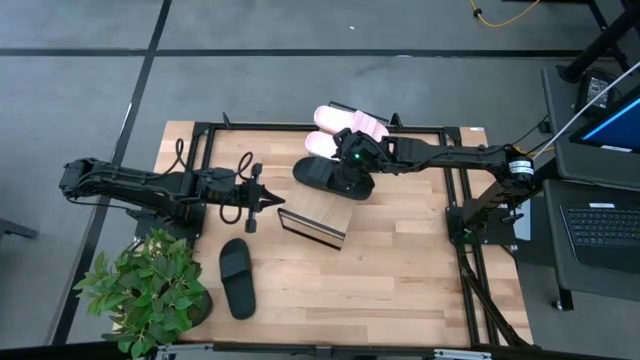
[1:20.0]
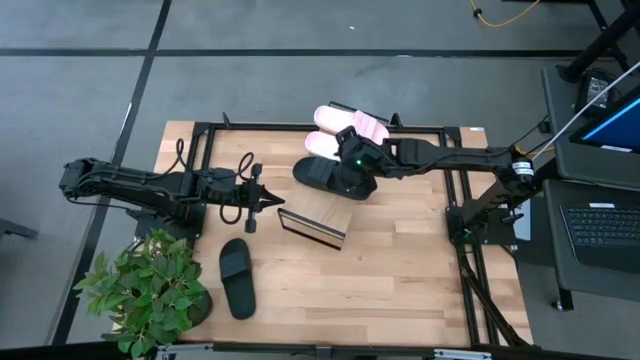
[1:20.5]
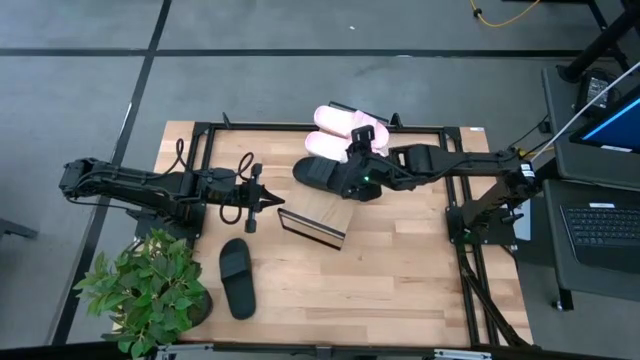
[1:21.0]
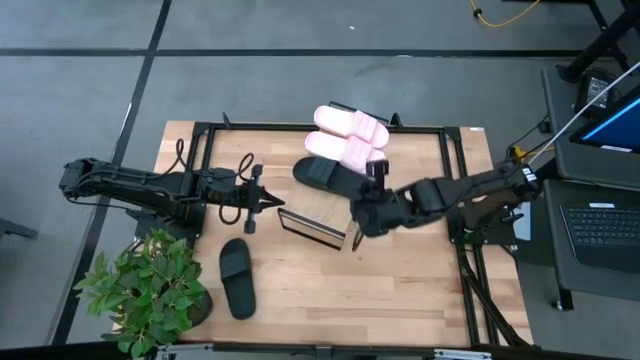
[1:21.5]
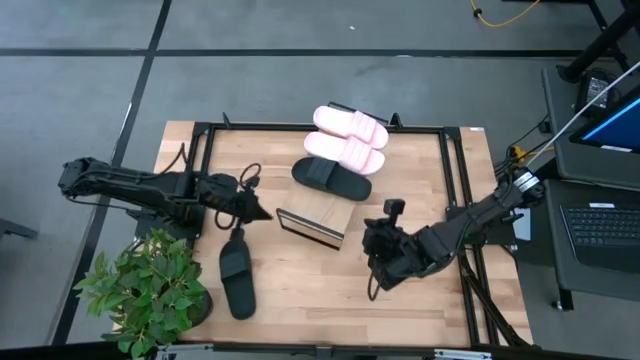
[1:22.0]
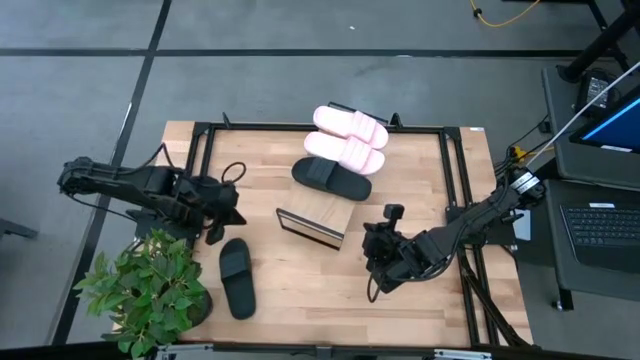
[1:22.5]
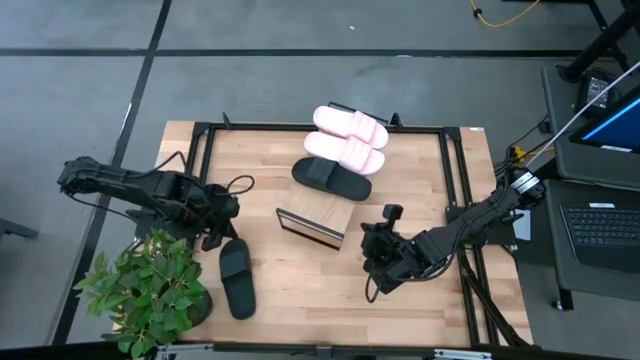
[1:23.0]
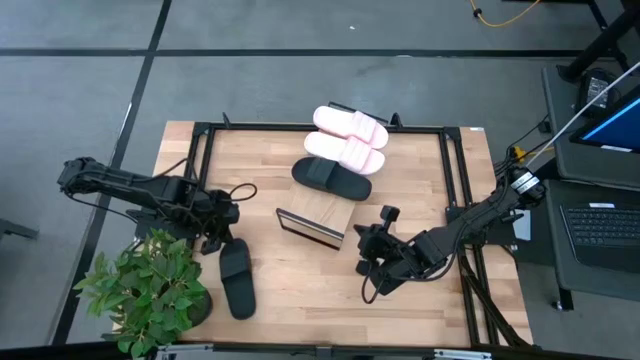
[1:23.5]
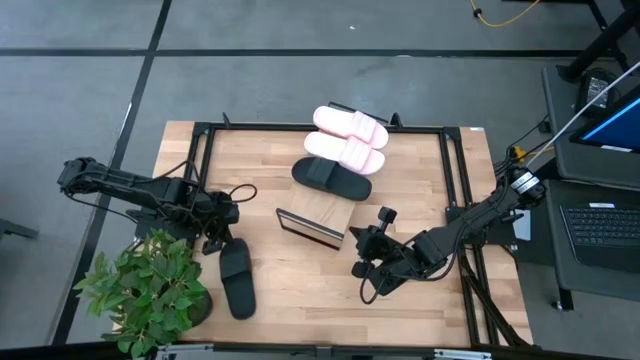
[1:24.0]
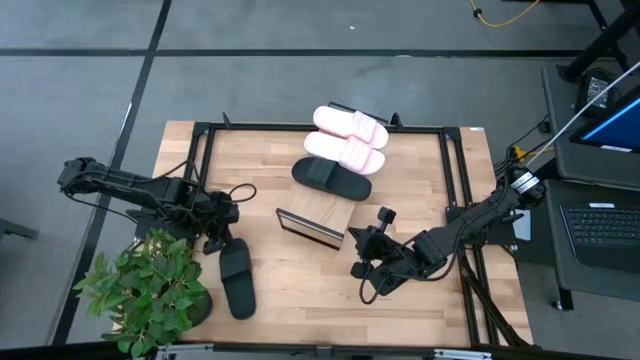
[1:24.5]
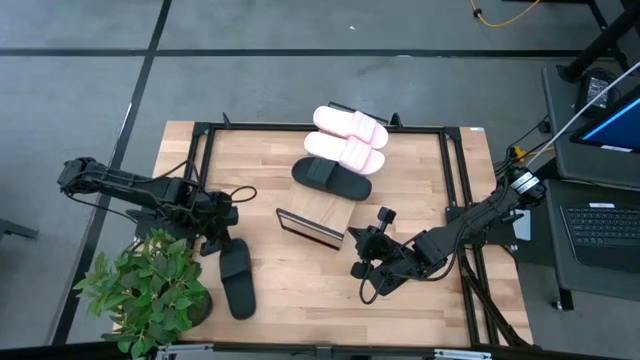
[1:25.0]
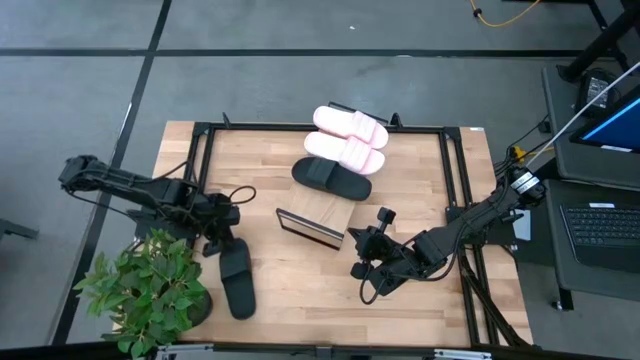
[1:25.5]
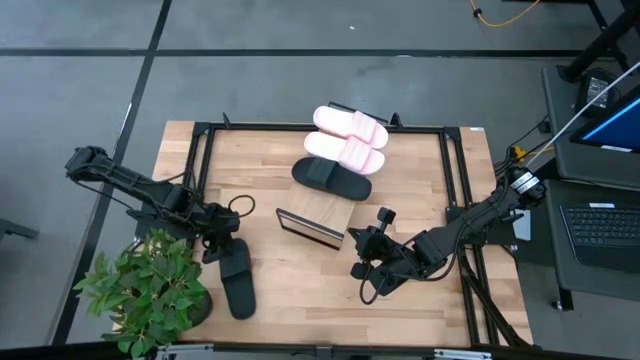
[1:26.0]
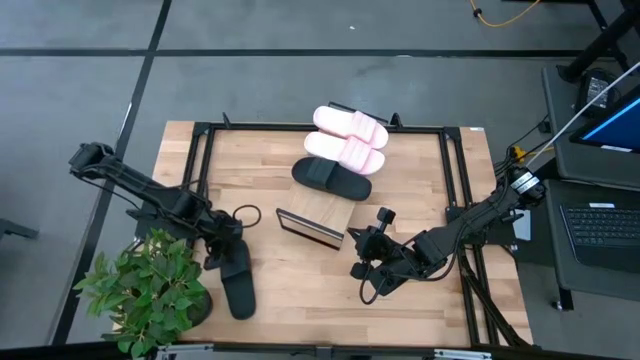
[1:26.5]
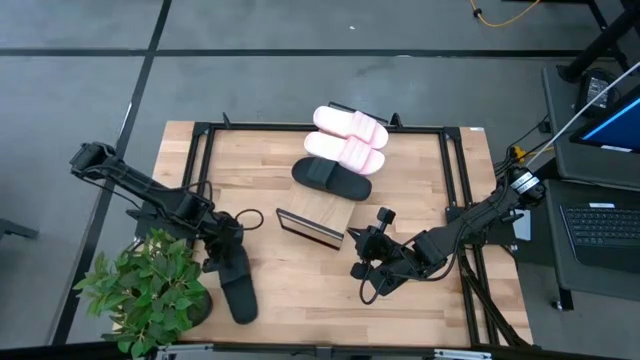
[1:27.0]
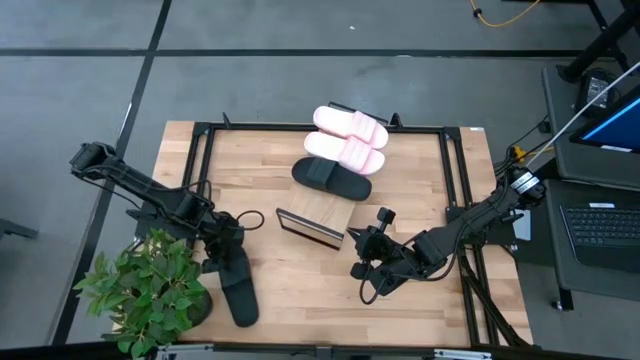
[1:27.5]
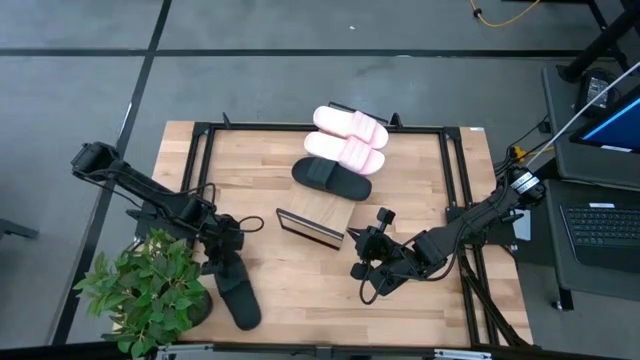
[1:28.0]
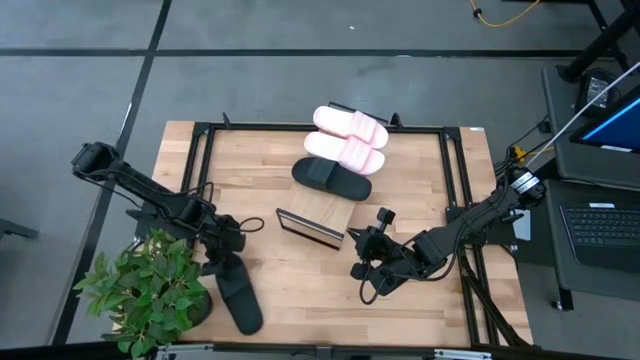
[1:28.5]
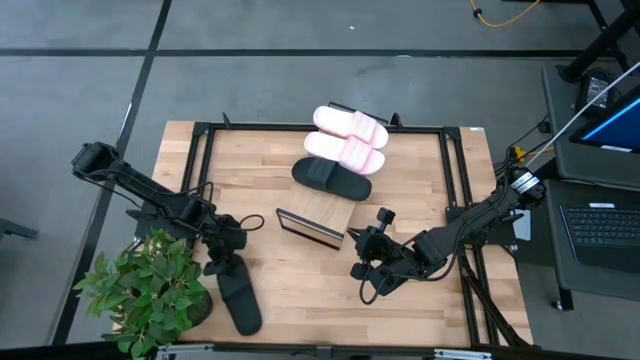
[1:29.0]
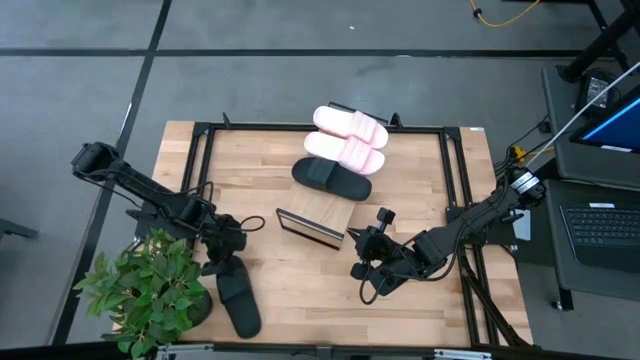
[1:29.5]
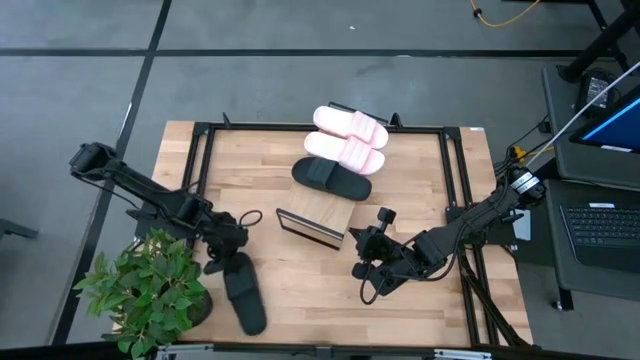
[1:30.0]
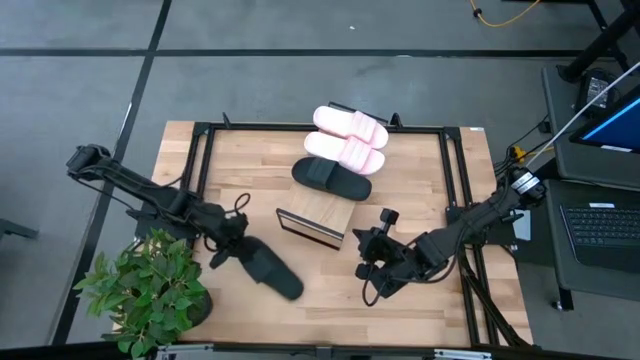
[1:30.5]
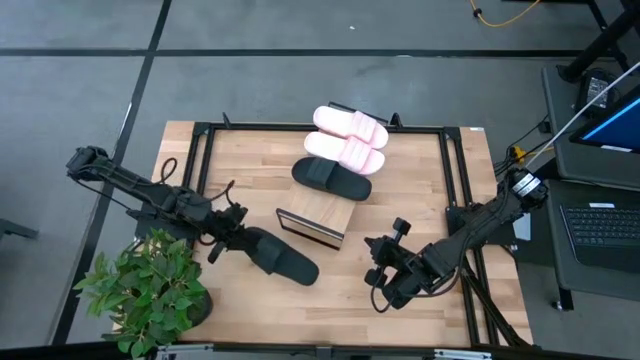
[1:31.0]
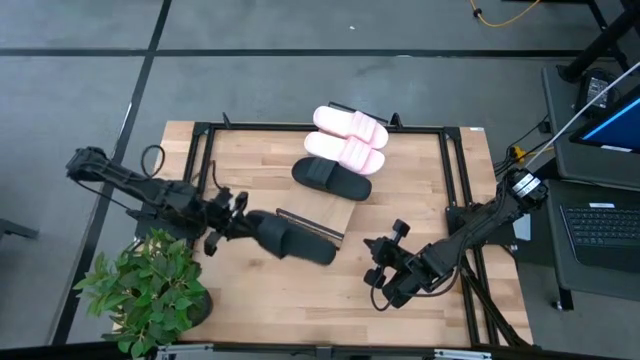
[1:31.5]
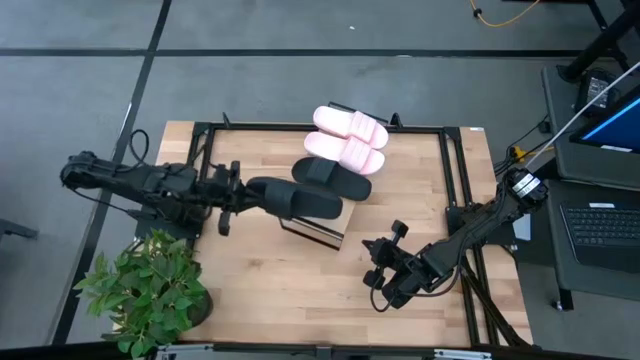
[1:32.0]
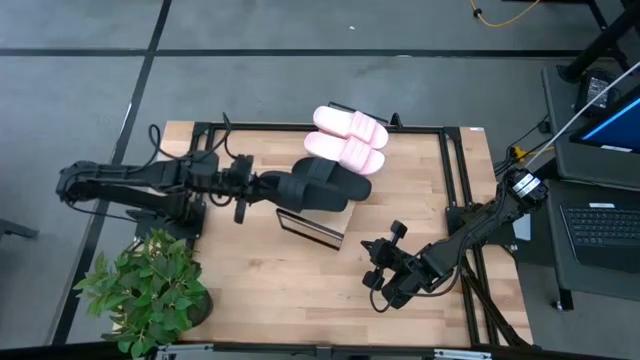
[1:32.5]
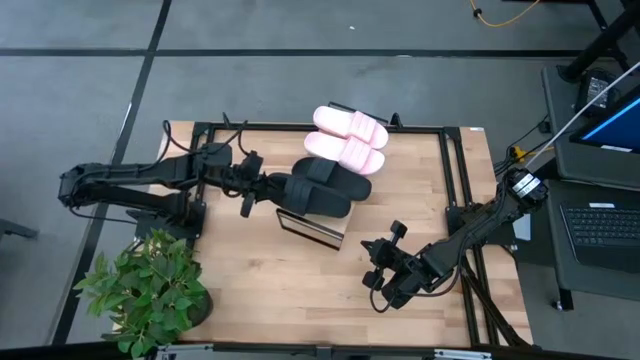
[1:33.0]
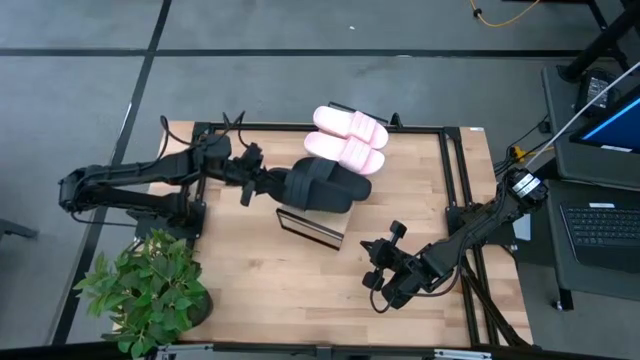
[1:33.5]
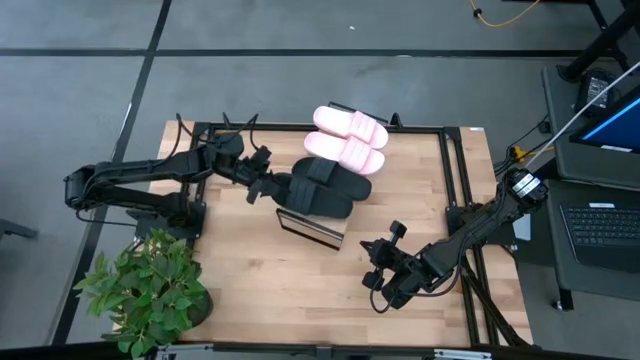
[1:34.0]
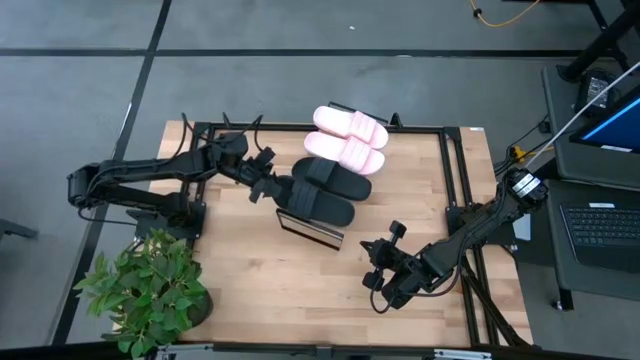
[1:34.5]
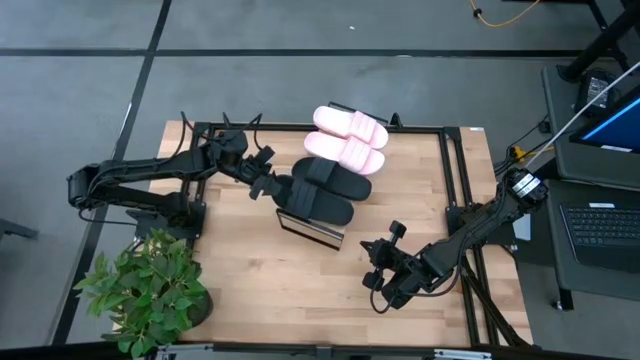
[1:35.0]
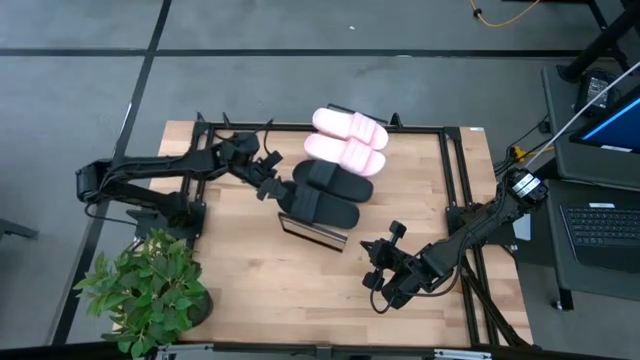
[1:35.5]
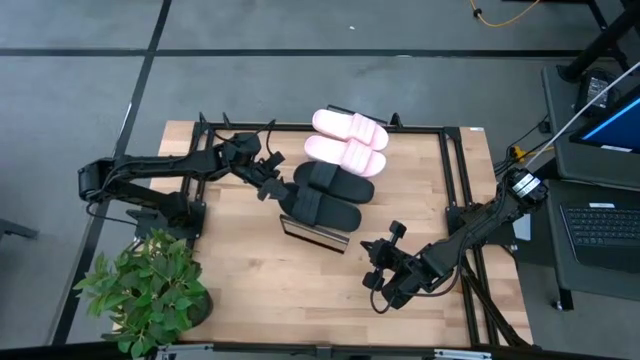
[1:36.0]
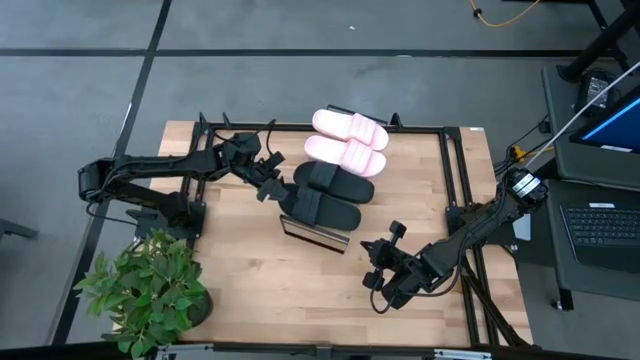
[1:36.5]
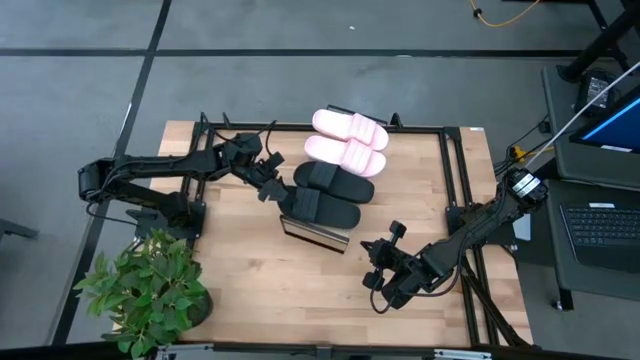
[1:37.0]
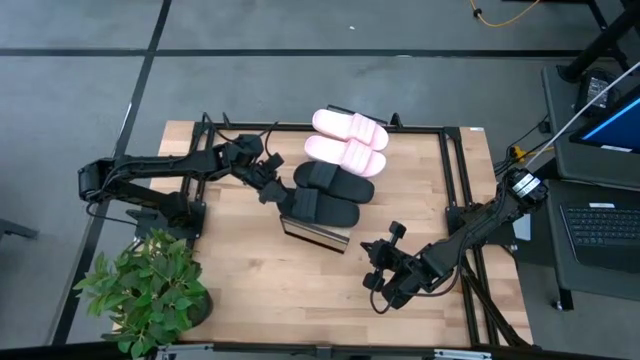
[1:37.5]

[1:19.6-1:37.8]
Task: Pick and place slides into the shelf
Put the black slide on the shelf

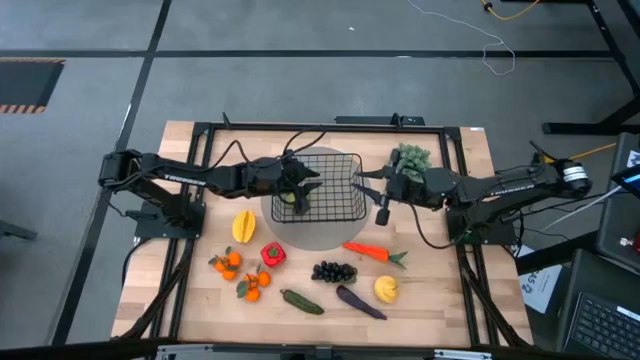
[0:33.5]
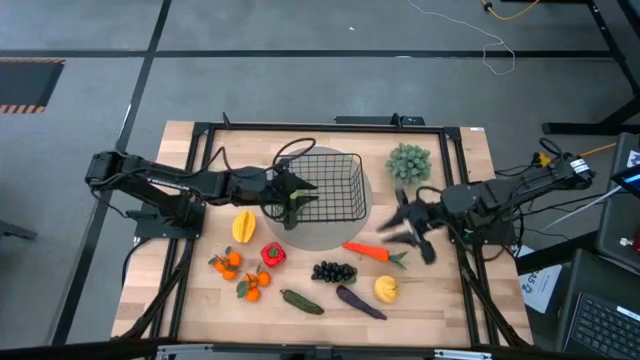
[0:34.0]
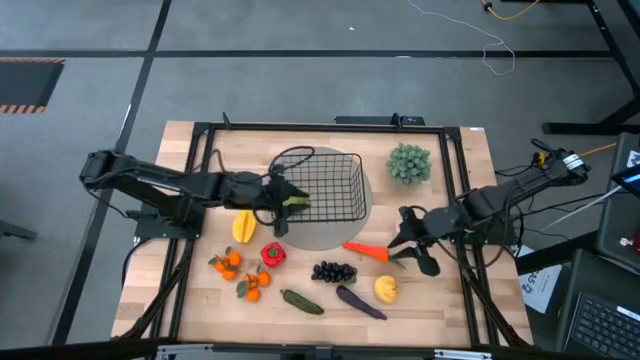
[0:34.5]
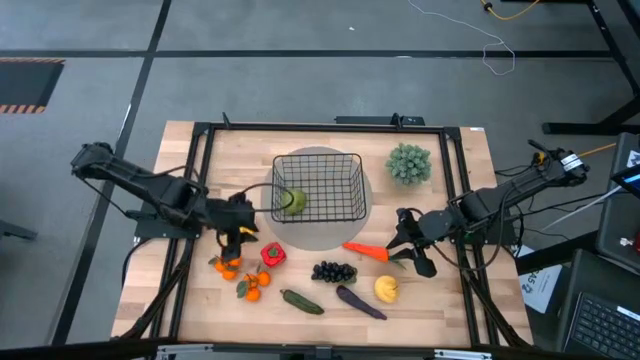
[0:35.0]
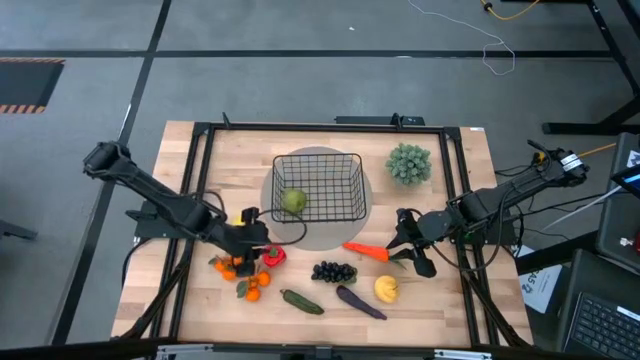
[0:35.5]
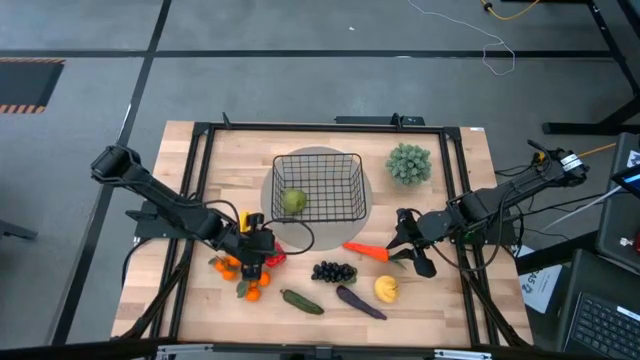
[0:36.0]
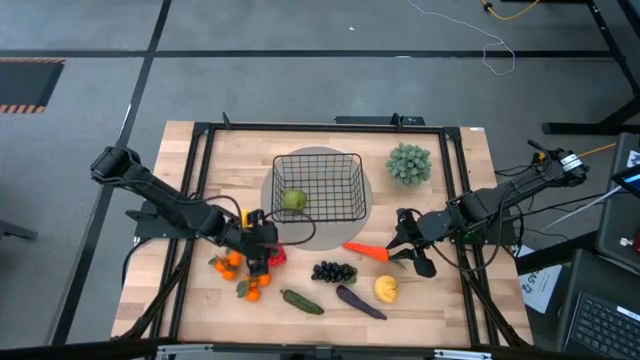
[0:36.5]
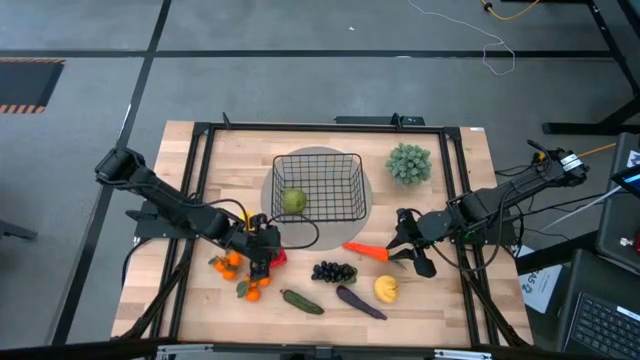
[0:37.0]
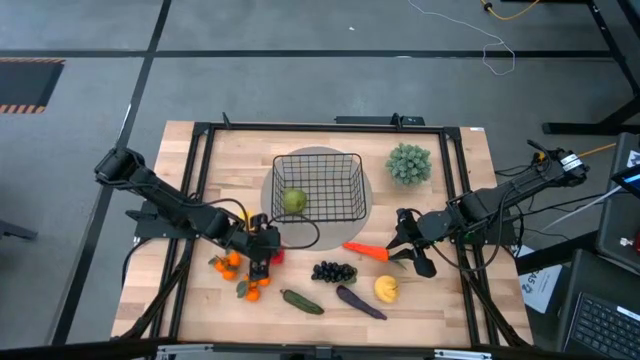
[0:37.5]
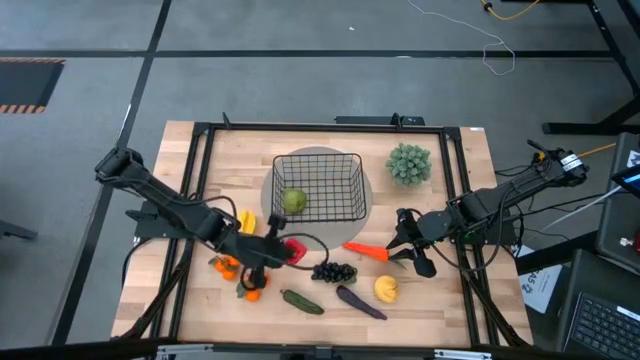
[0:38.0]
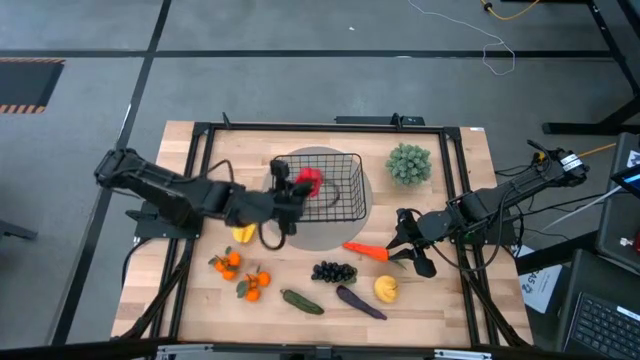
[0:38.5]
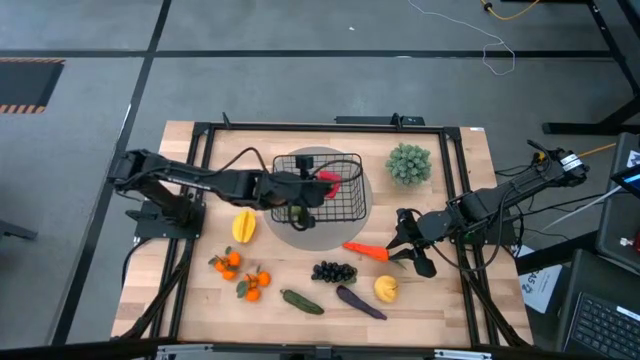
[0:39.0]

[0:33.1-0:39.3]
Task: Build produce basket
Put the red bell pepper into the black wire basket
